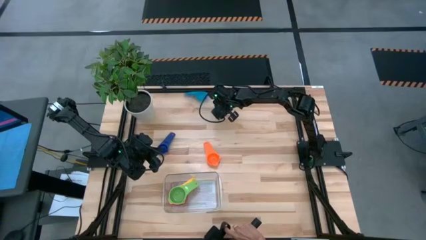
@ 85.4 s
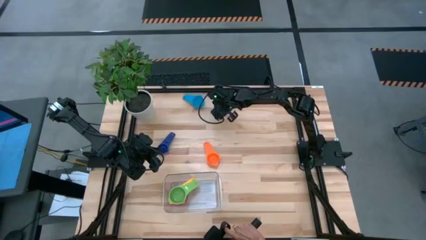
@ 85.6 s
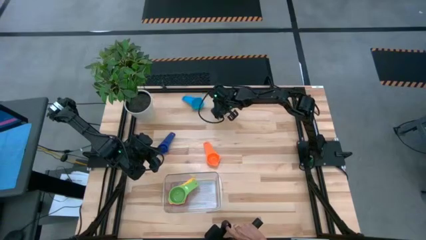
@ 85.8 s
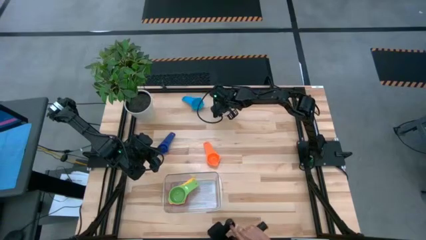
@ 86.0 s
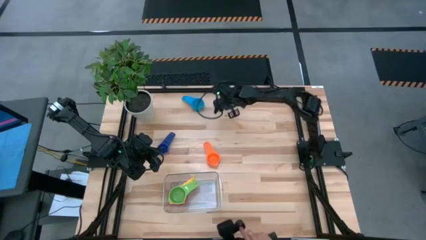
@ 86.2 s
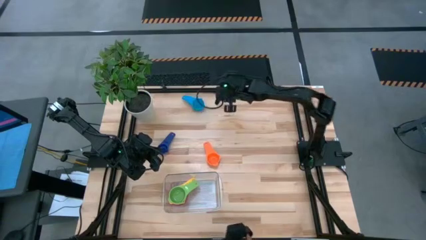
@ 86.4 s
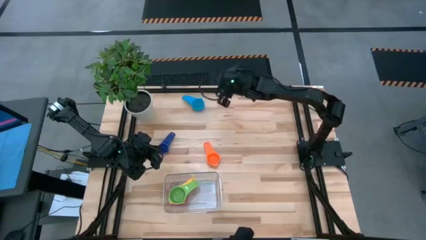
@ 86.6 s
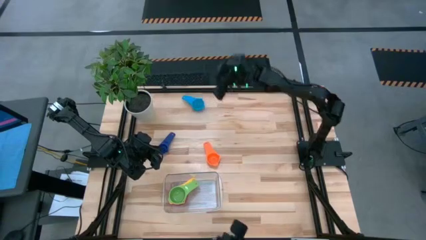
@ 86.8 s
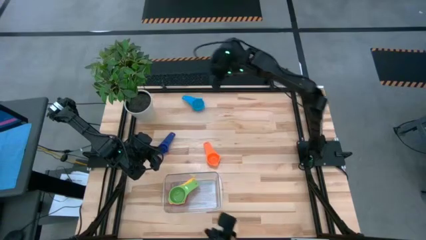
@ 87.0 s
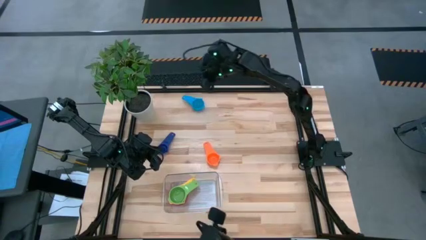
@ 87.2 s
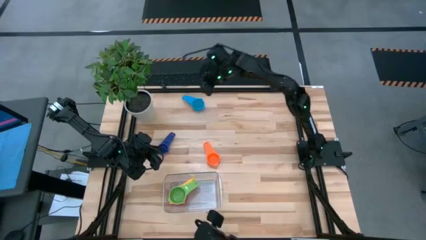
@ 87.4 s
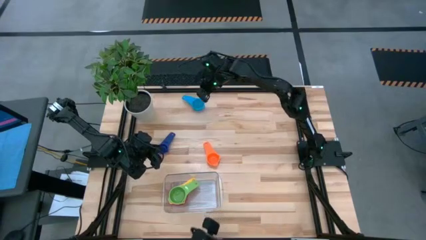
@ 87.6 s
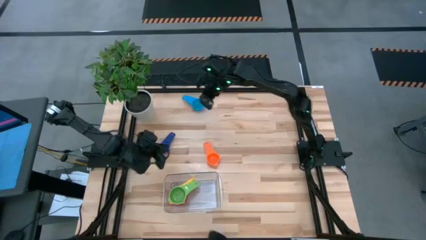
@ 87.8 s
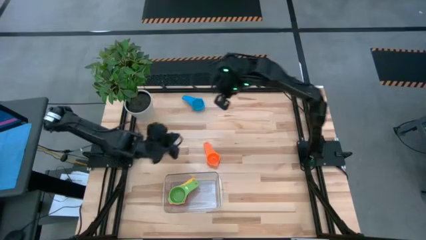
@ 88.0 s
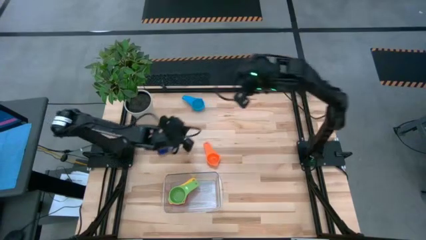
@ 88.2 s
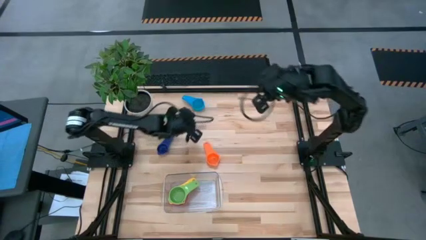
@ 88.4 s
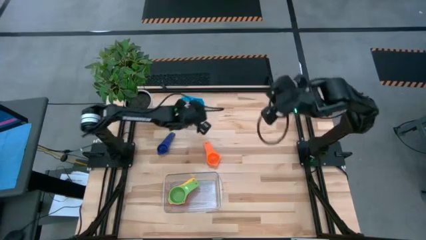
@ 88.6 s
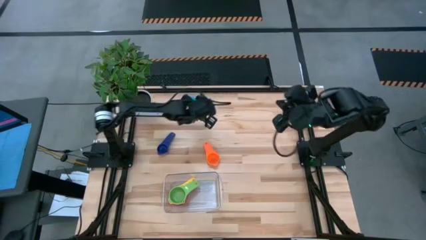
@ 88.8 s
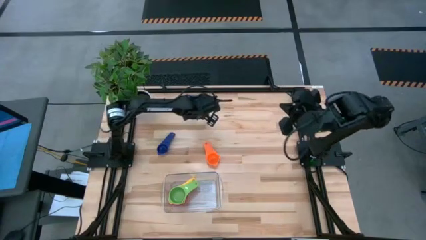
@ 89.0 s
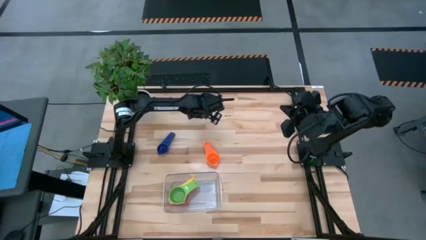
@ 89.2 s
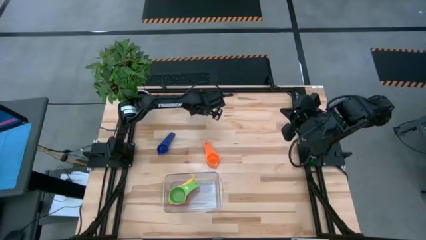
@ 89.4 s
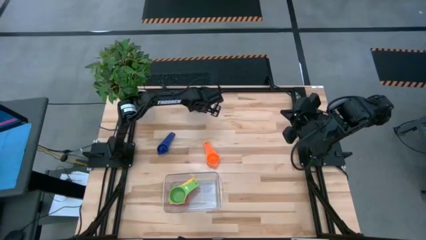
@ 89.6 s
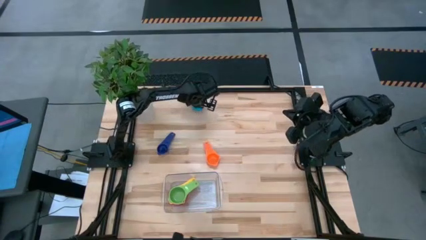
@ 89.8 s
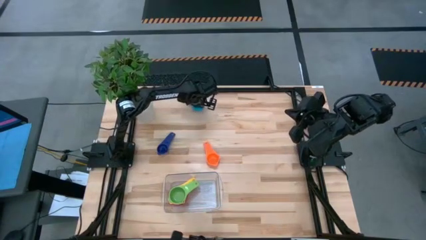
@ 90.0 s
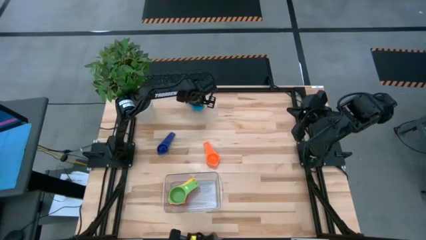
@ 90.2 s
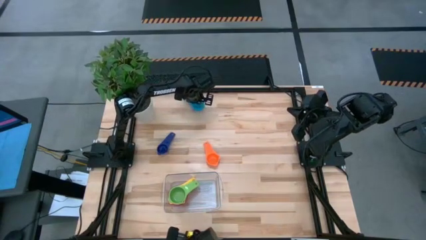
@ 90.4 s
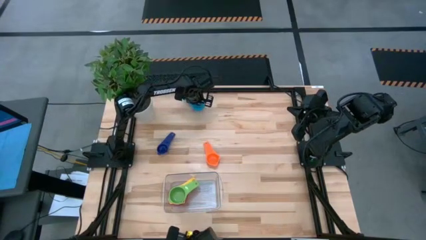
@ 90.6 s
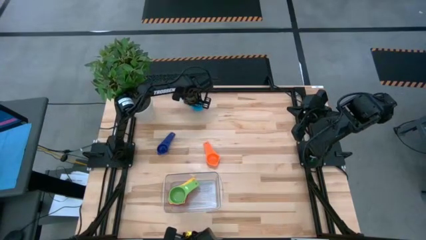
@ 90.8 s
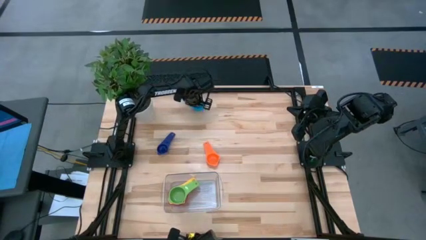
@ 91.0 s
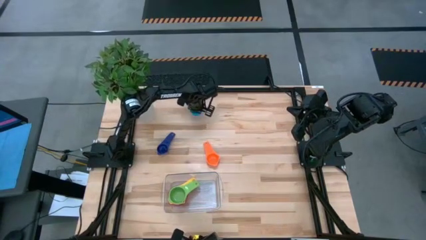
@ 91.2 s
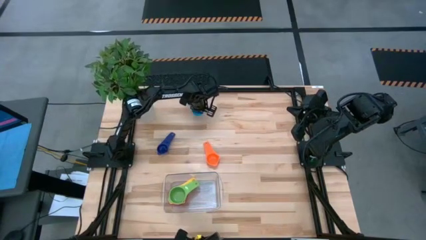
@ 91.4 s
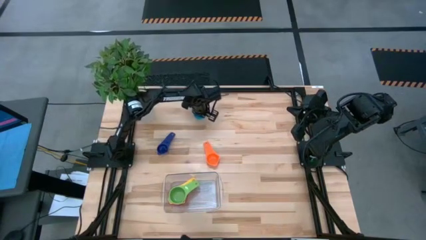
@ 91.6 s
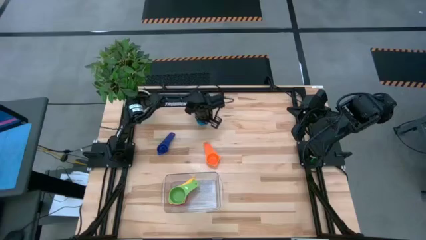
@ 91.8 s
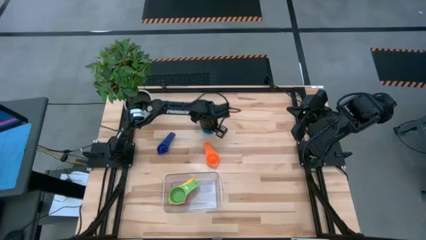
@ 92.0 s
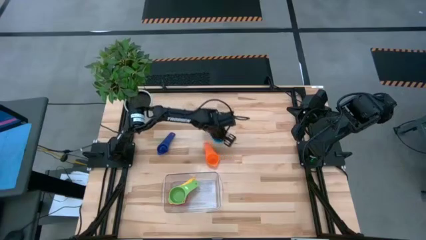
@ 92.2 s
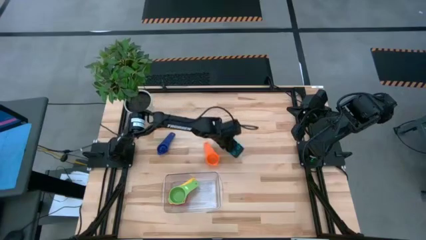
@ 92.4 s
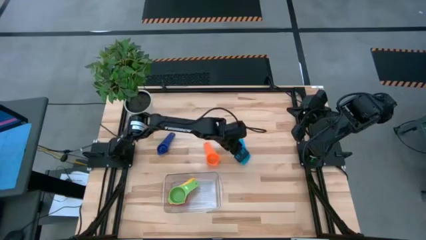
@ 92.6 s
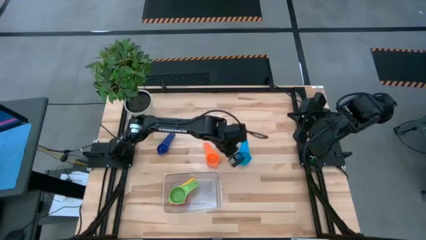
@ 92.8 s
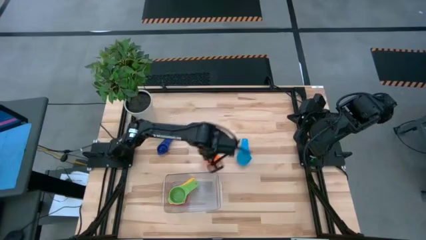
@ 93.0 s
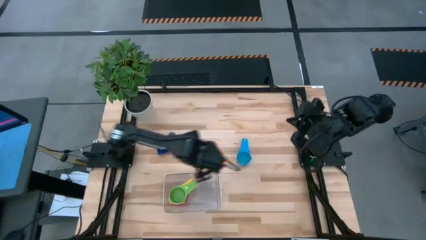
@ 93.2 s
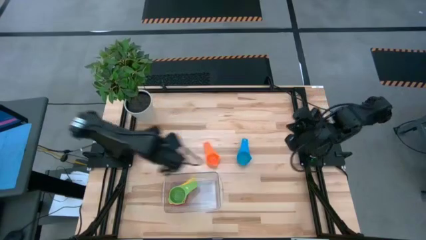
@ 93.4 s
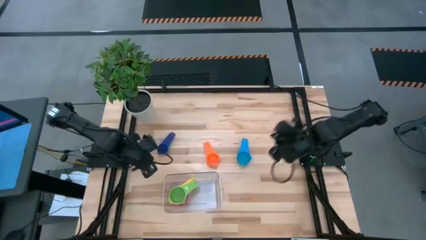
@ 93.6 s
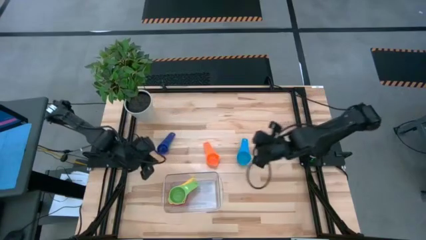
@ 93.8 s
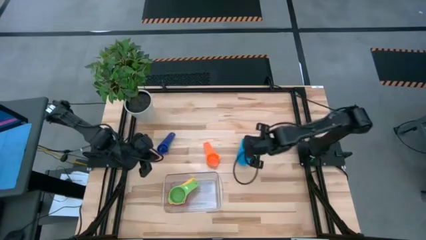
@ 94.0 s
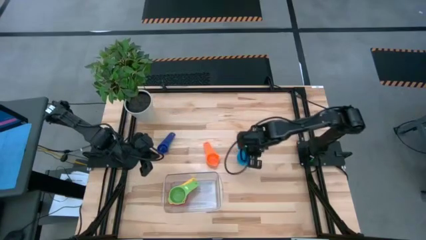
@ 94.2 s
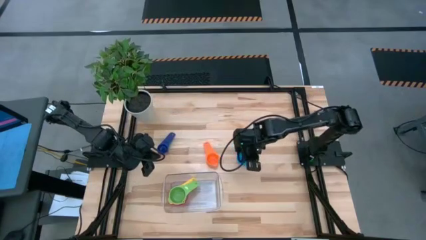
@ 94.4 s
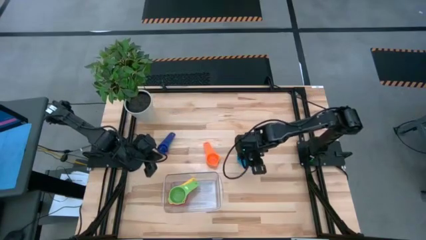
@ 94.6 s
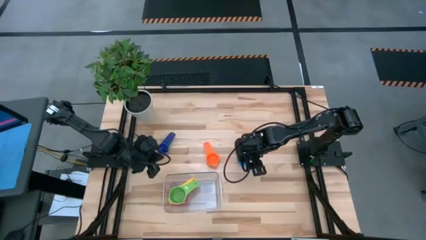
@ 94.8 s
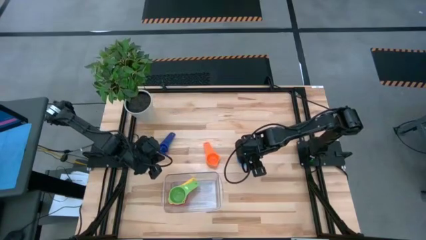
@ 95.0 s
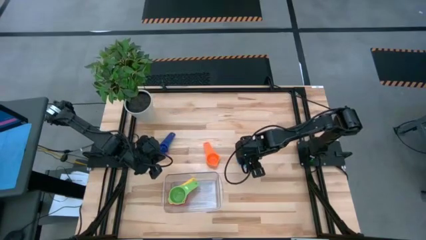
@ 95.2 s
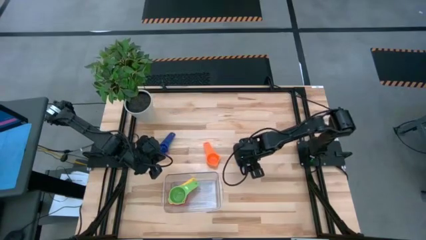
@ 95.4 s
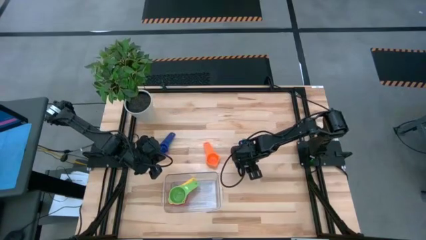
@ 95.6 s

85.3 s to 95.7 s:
Task: Nest measuring cups in basket
Stack the light blue measuring cup on top of the green measuring cup into the transparent bin

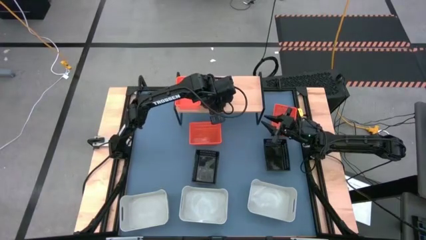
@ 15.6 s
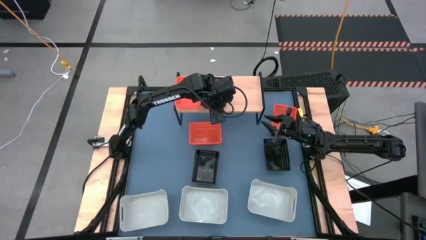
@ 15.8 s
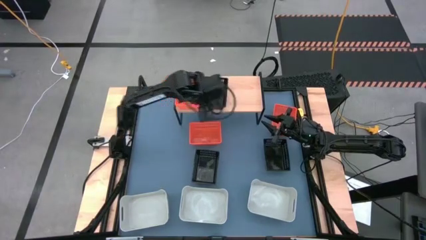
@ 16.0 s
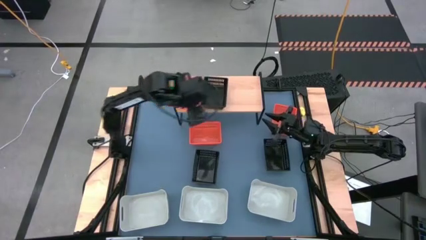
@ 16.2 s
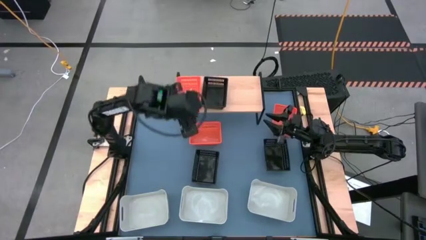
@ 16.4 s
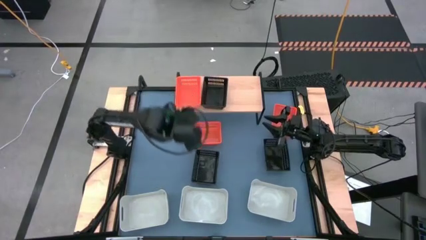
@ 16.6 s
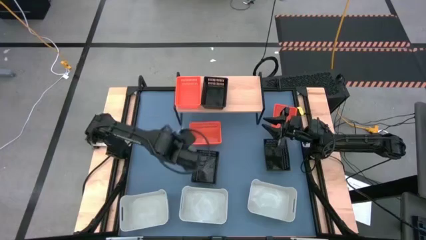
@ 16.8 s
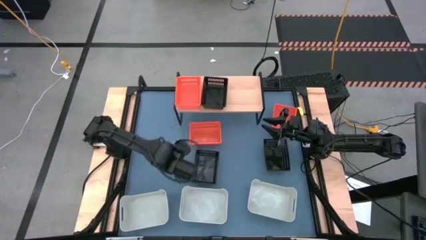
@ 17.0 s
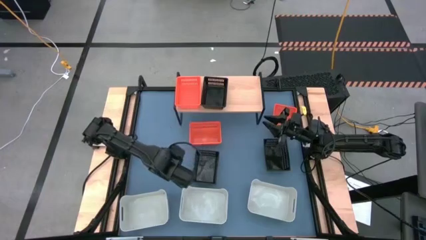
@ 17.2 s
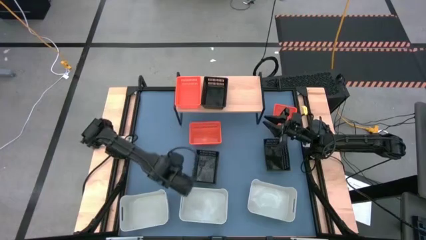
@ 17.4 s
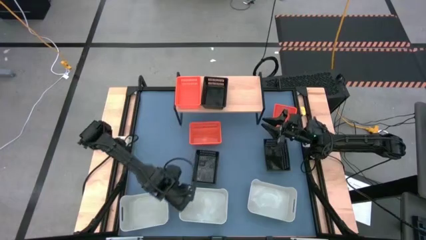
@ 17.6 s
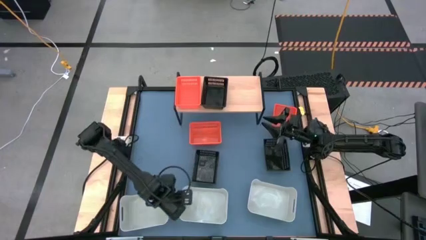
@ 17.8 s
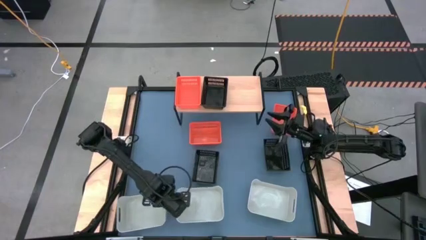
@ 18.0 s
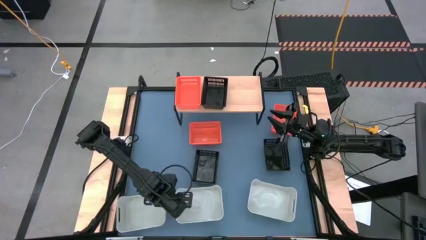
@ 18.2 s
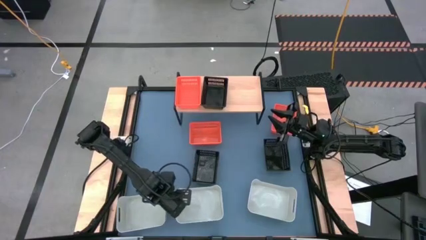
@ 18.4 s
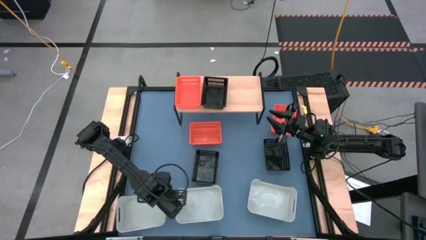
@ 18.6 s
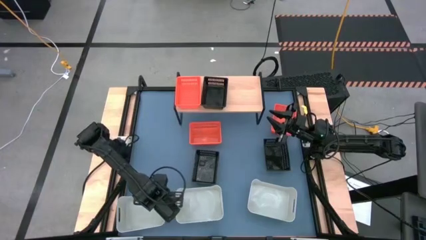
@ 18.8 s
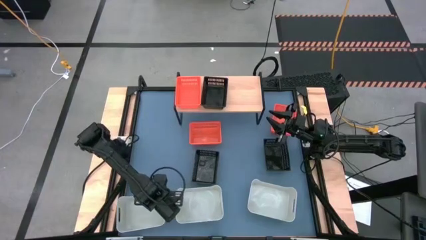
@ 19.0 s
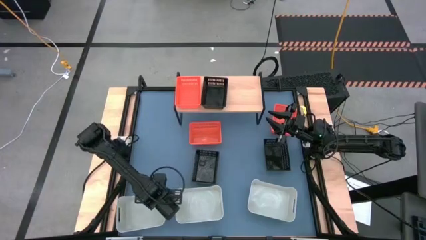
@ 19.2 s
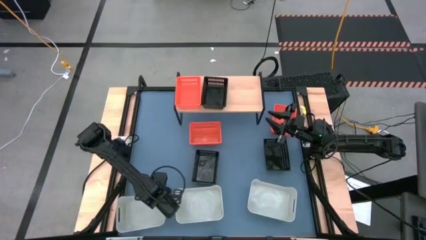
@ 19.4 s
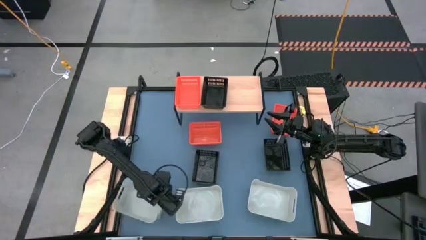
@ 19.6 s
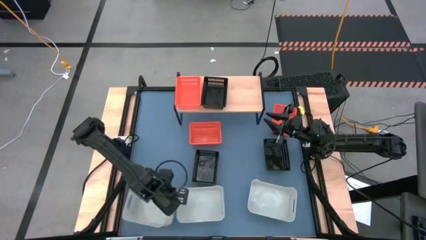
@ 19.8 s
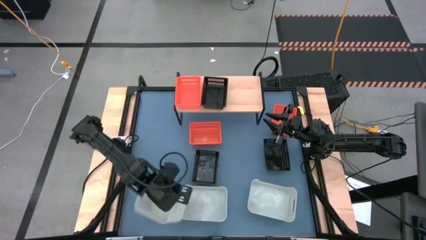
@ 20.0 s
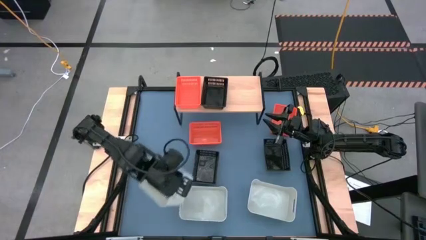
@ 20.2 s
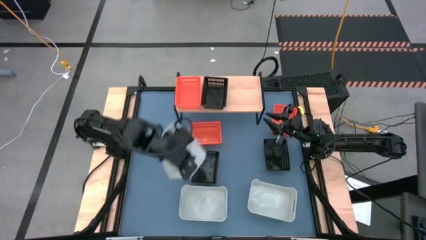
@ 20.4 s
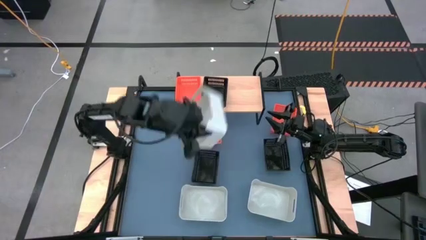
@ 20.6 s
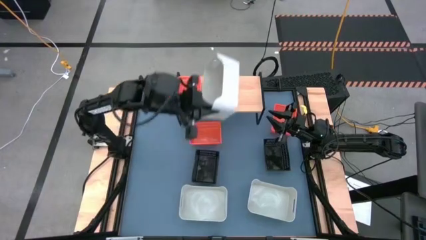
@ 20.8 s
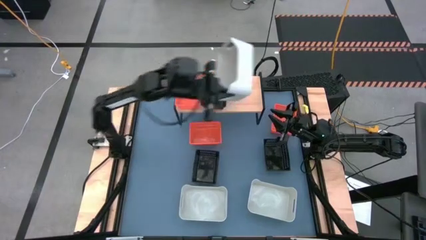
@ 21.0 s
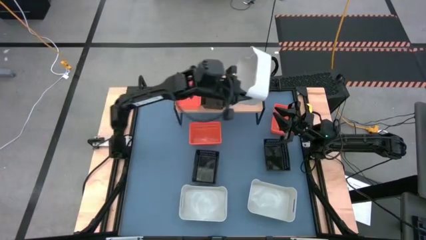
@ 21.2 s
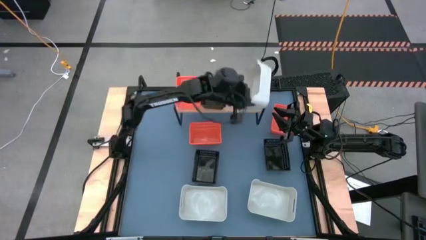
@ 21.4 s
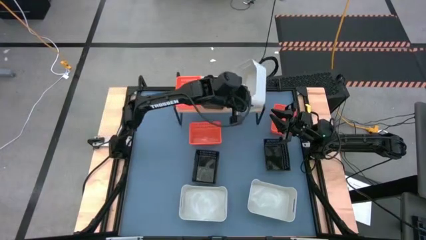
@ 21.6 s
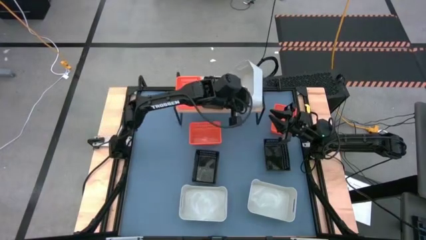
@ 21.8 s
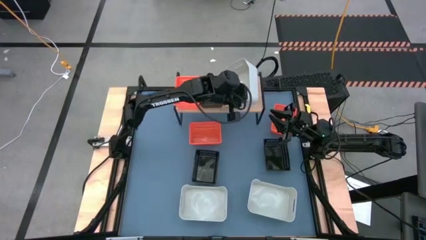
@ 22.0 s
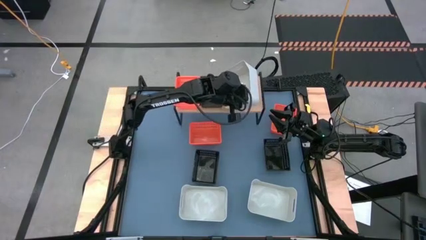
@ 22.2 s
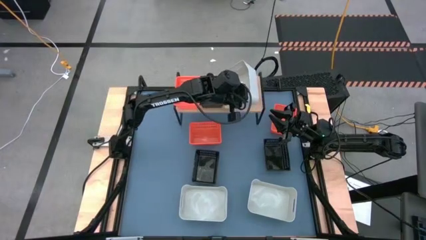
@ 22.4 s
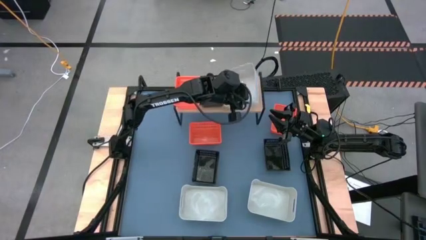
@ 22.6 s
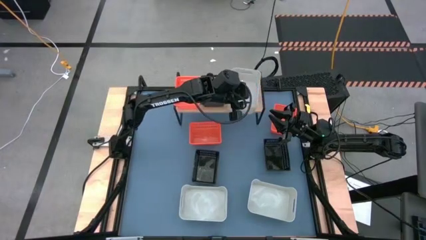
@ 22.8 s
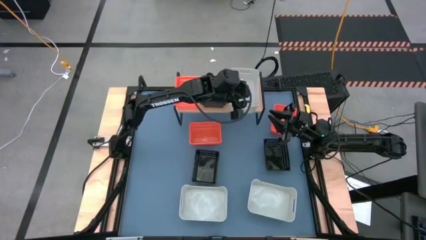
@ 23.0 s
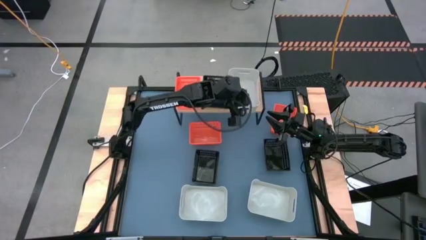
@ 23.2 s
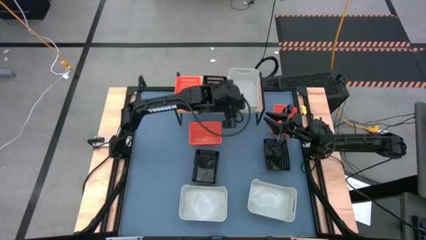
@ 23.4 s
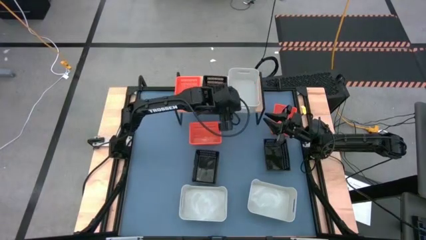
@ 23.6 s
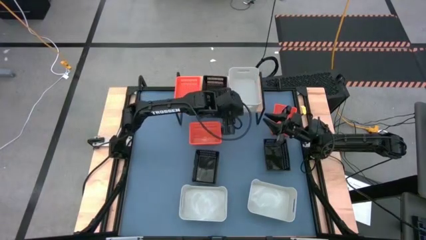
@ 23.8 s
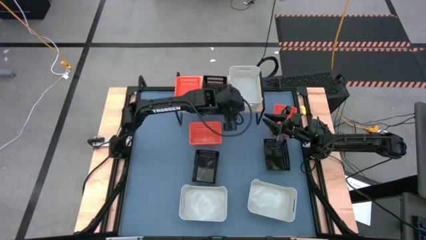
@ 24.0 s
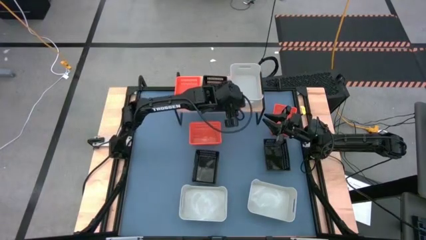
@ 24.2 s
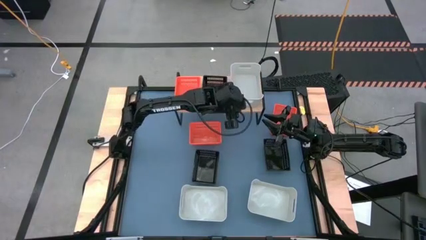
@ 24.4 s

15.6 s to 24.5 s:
Task: Stack baskets on shelf by color
Put the left gray bin on the shelf
